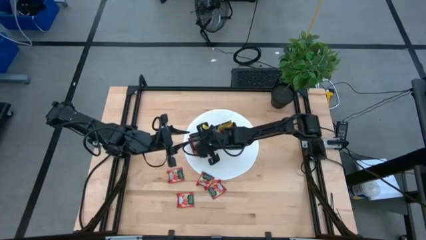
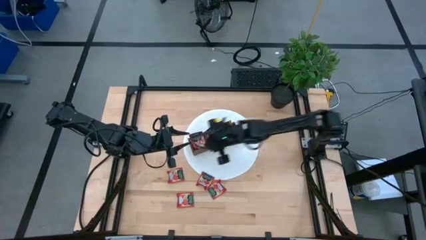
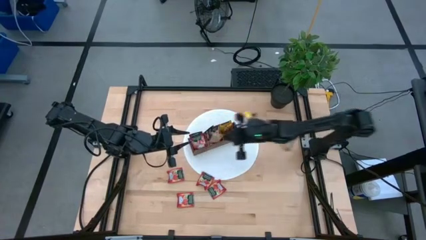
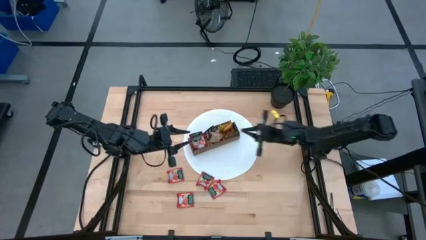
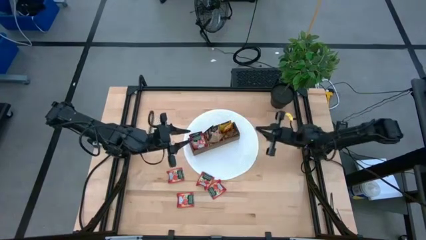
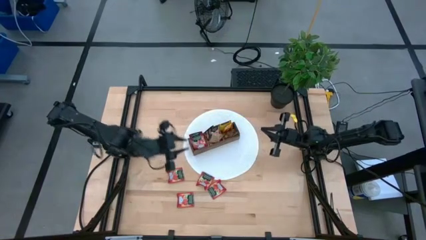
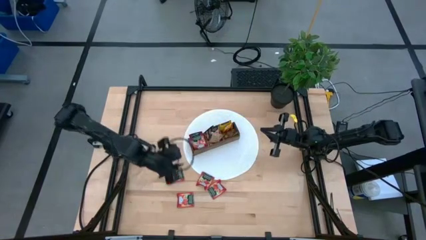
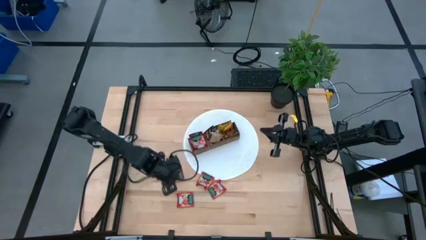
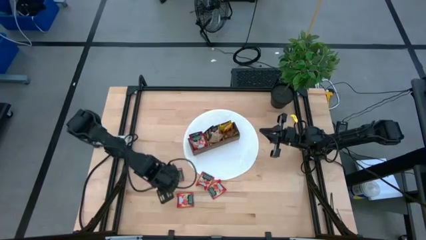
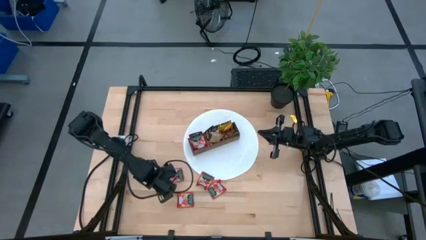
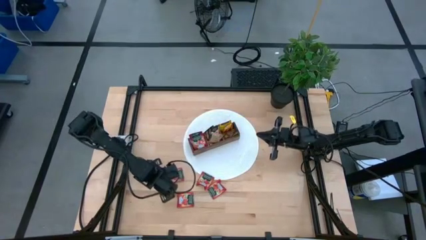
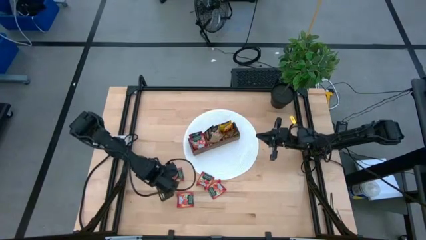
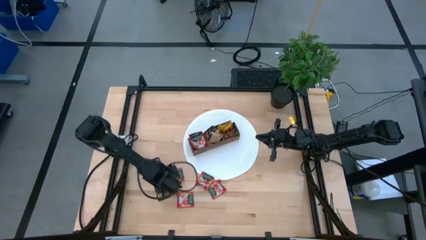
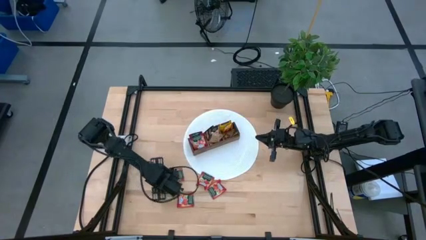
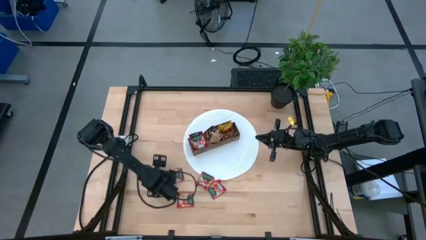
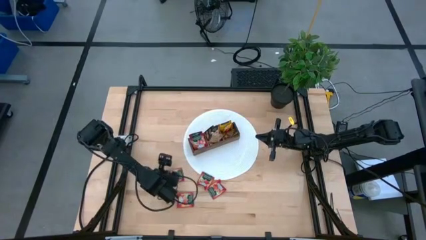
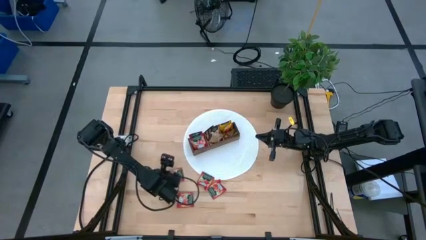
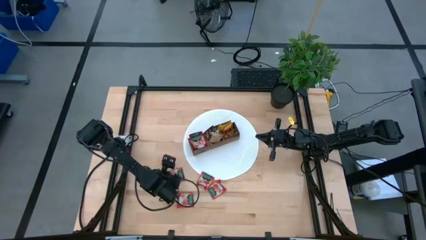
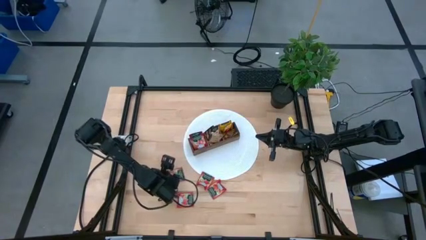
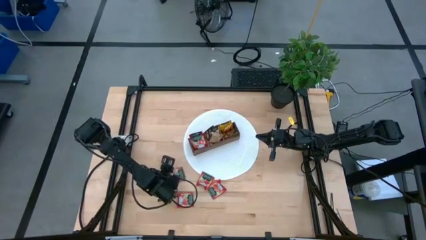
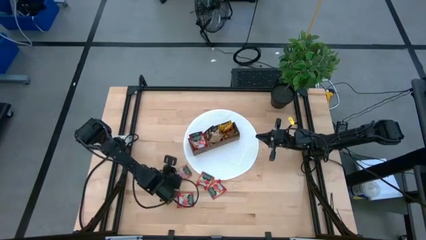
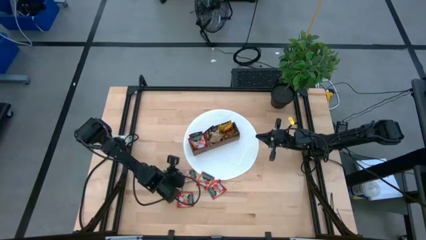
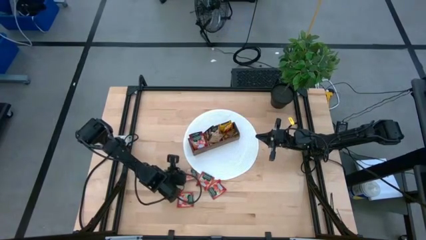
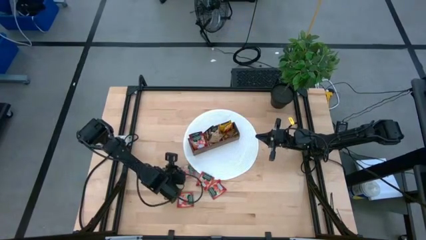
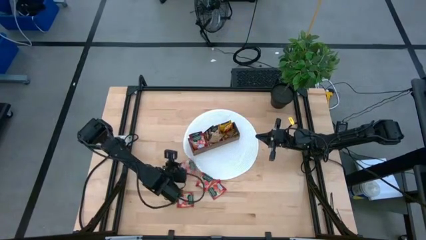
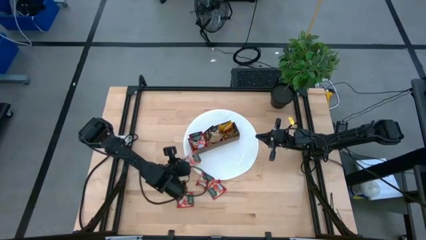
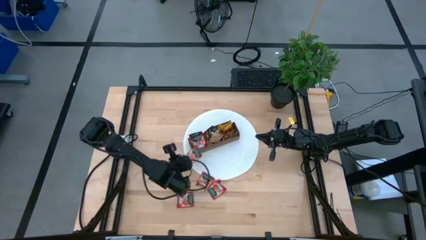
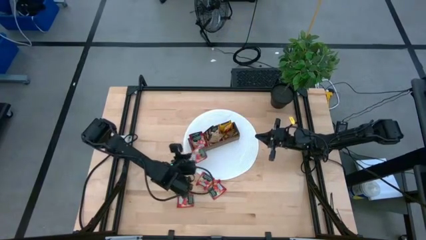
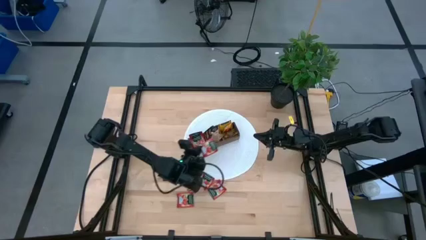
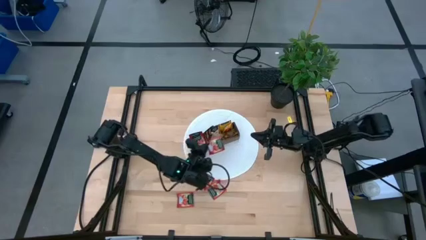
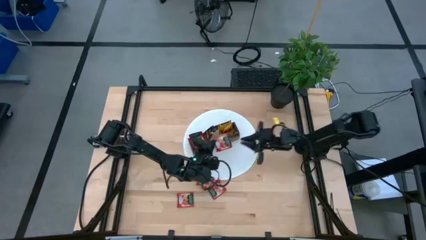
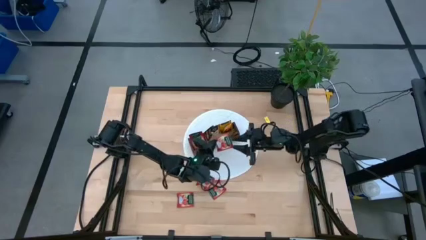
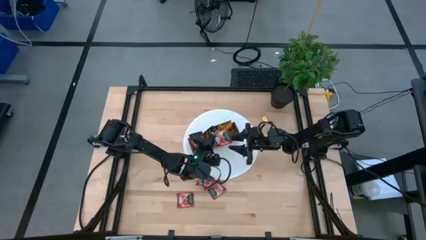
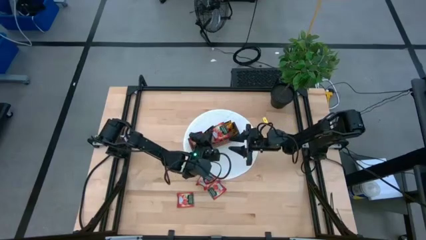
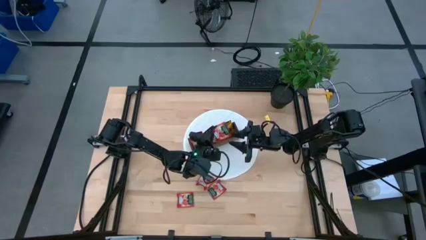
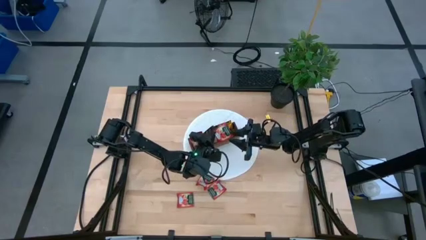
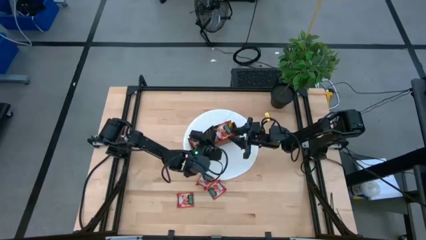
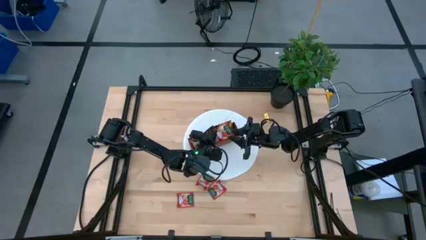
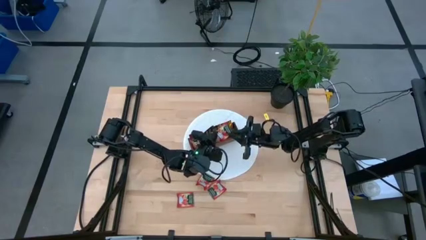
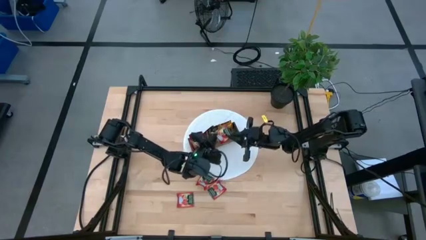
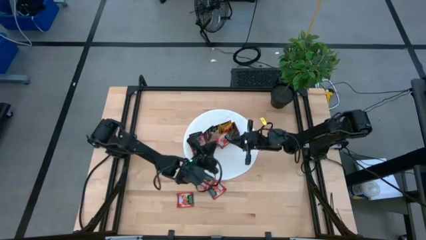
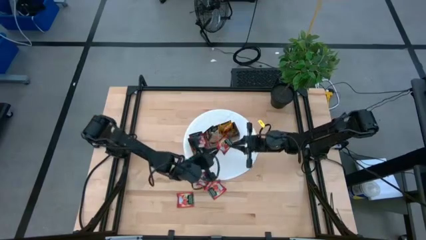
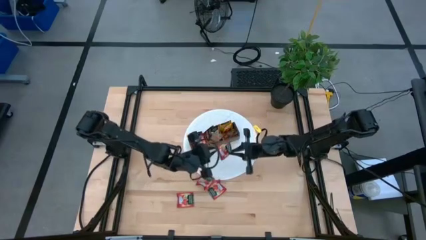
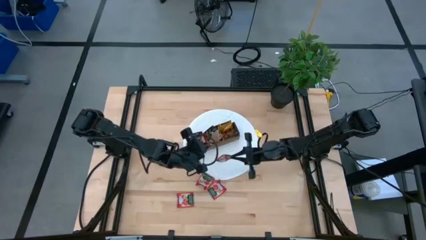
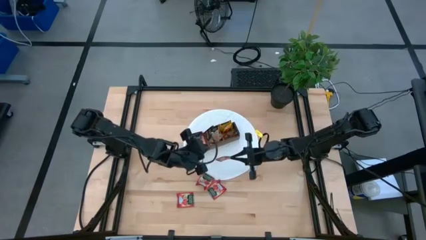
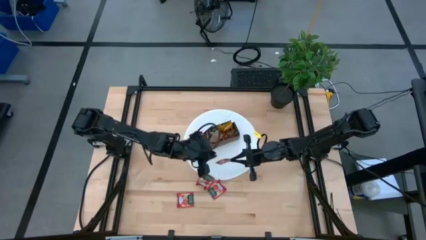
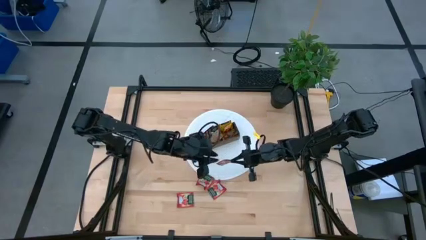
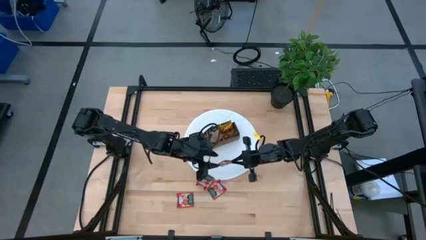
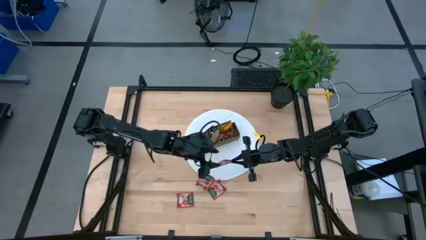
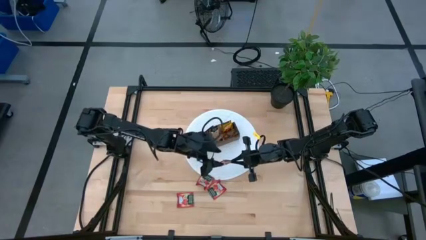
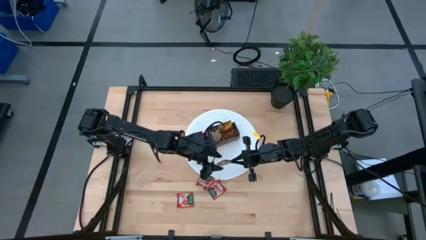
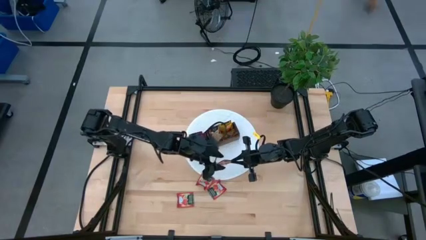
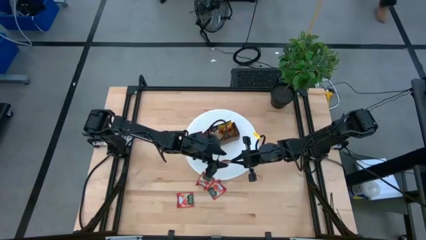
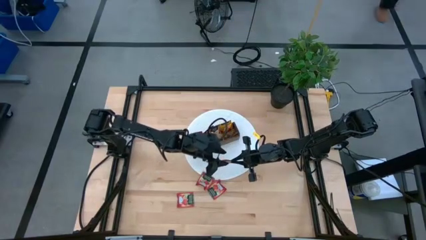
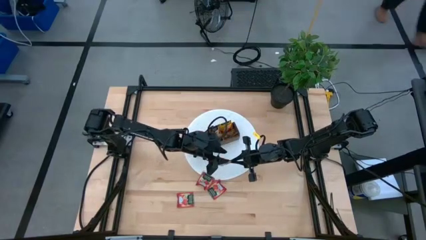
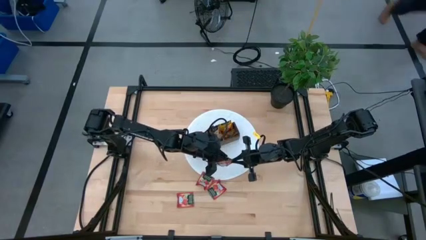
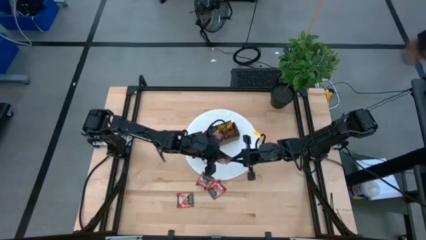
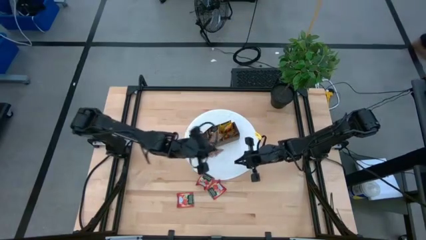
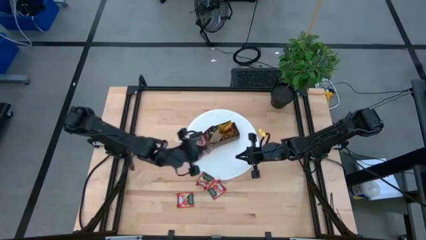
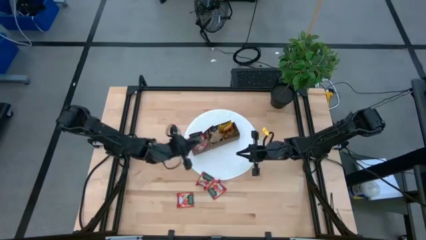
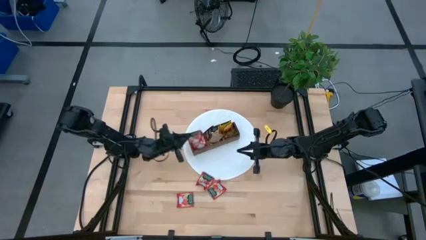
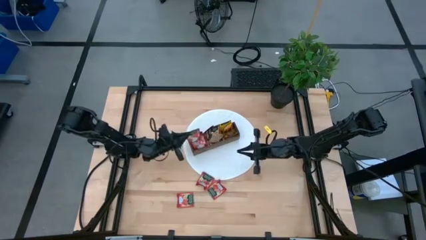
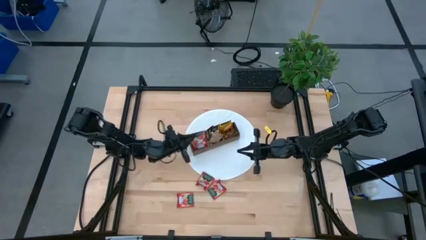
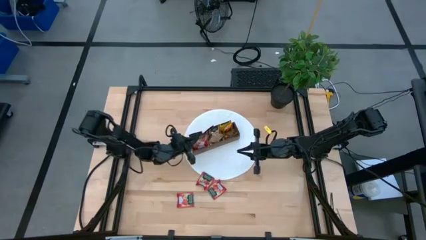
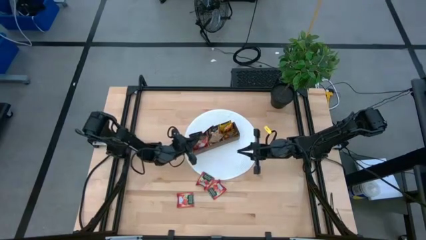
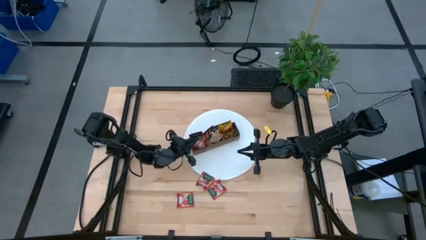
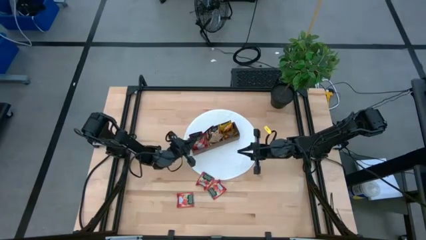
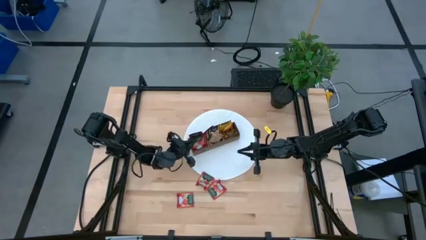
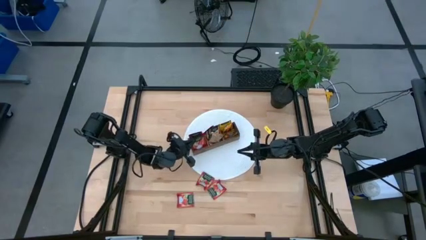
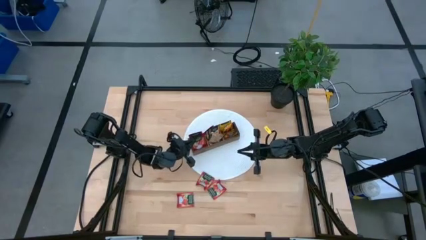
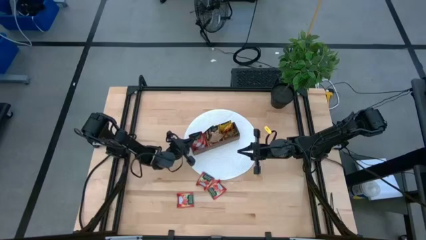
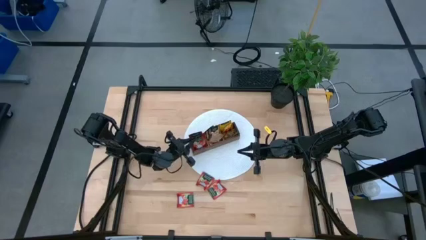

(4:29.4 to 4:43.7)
Task: Pick & Place Tea
Put the red tea bag into the left section of the wooden organizer

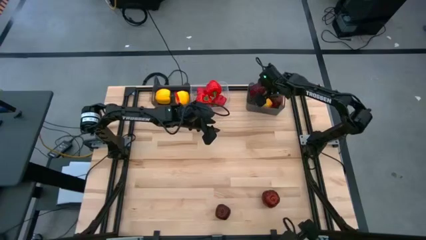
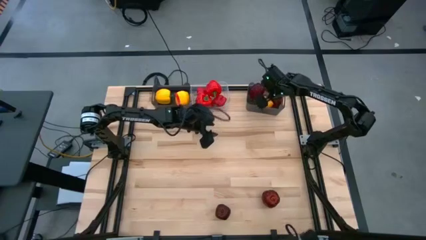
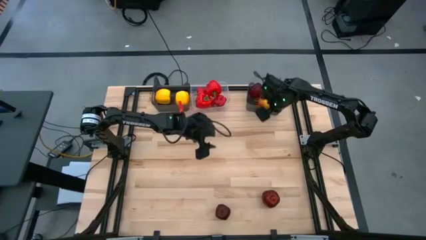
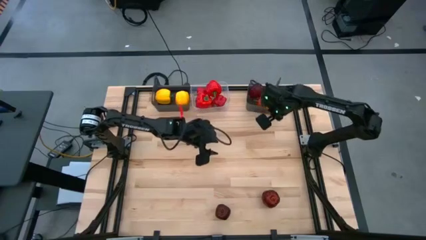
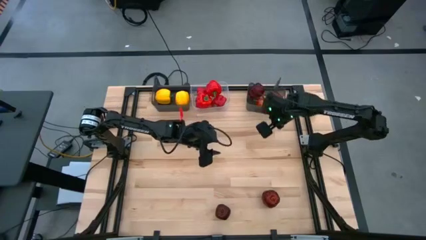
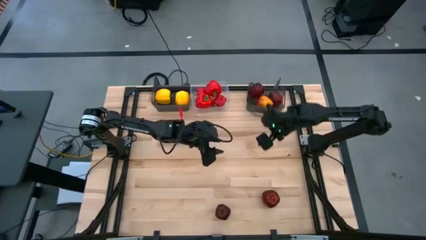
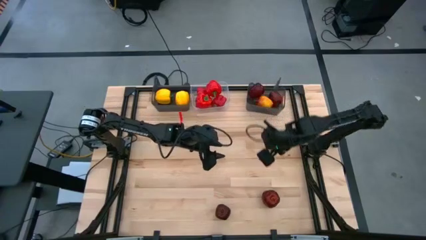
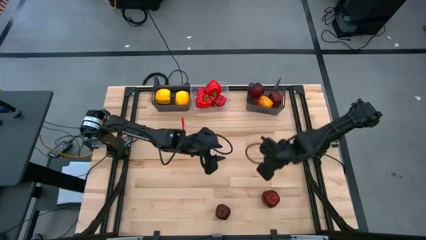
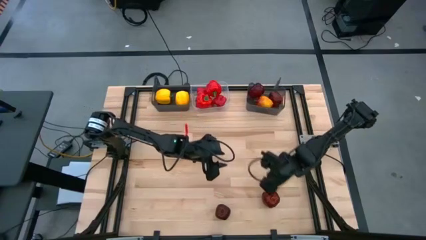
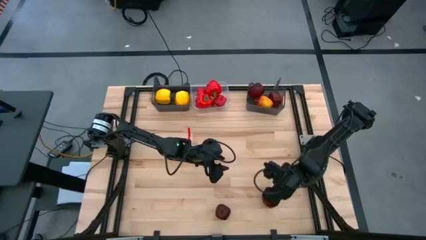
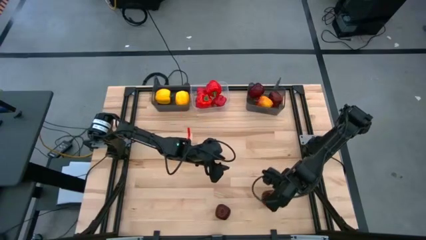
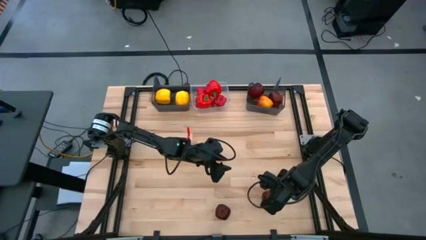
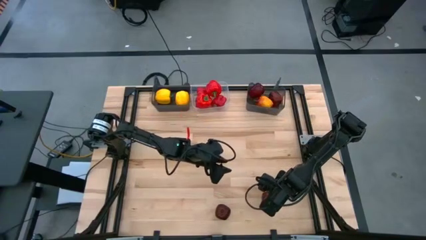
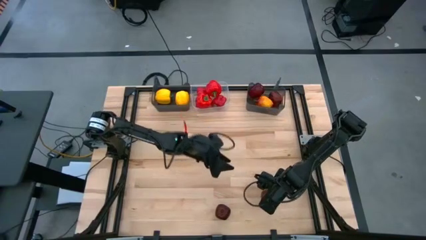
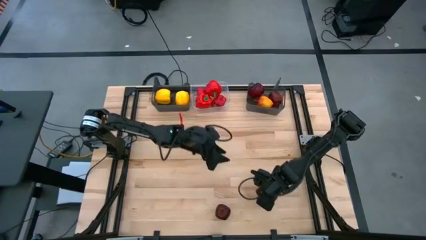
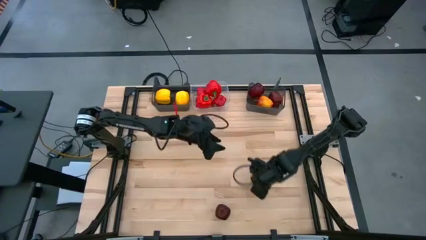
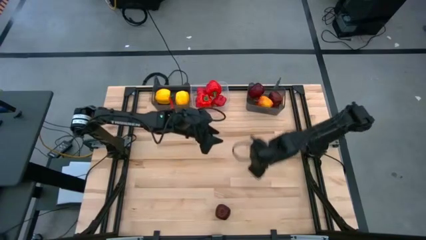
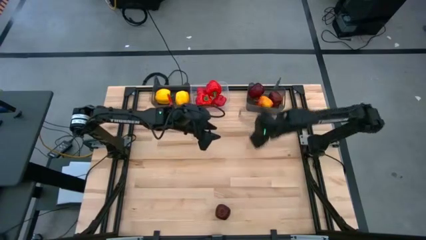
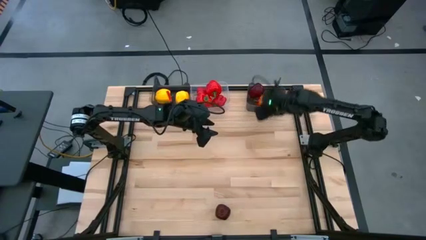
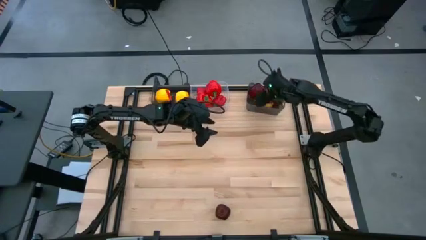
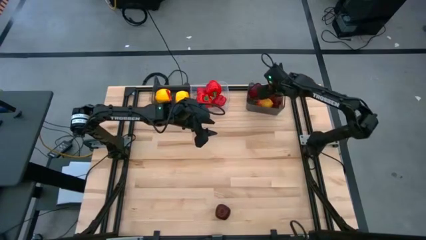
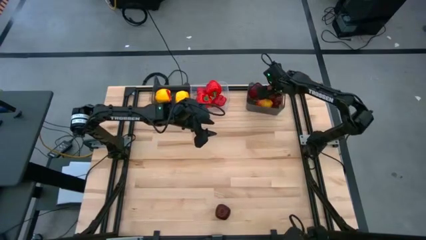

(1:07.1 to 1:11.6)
Task: Sort produce into baskets
Put the right red apple into the right black bin
